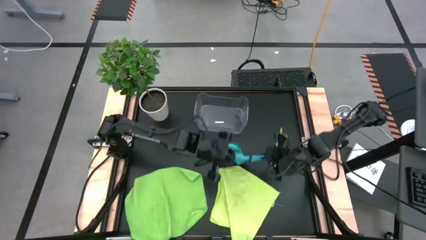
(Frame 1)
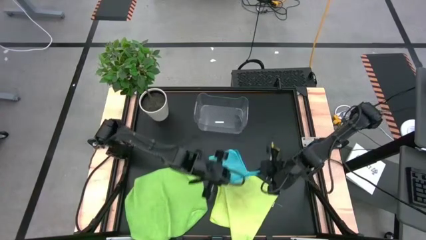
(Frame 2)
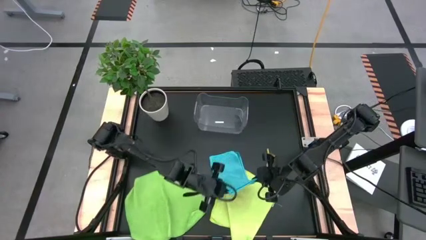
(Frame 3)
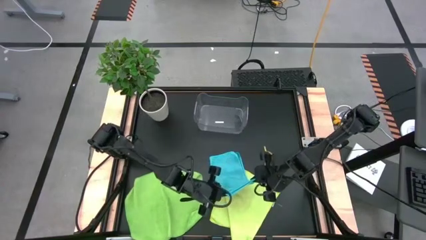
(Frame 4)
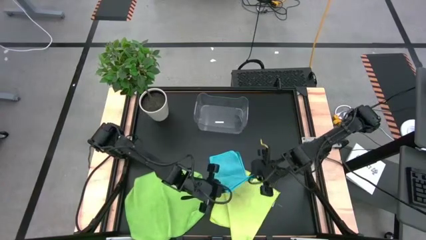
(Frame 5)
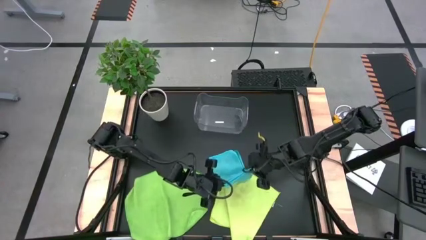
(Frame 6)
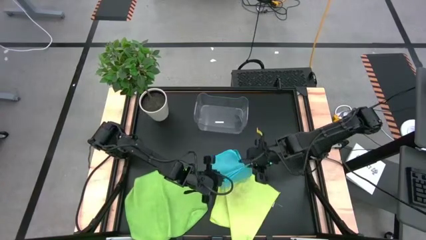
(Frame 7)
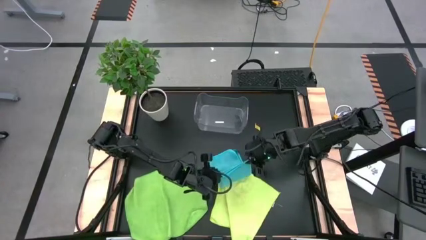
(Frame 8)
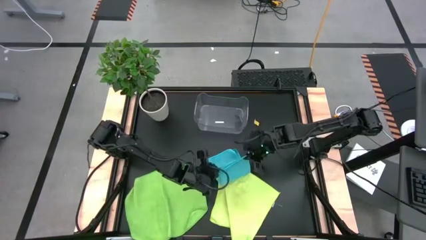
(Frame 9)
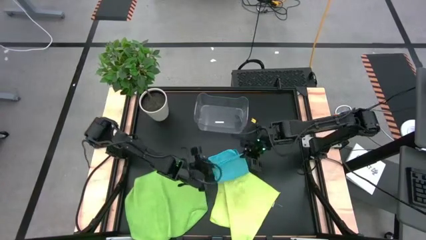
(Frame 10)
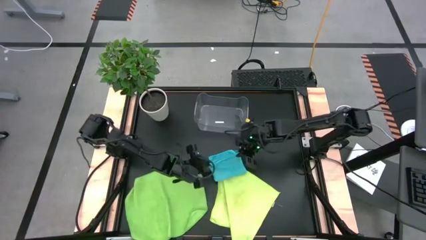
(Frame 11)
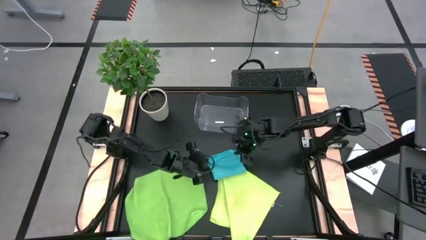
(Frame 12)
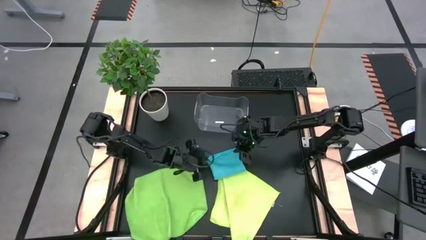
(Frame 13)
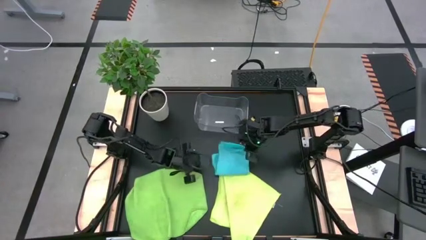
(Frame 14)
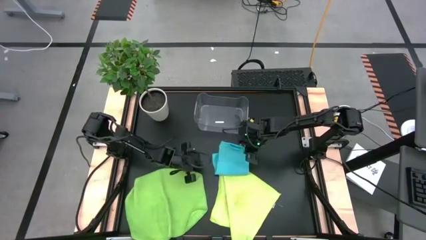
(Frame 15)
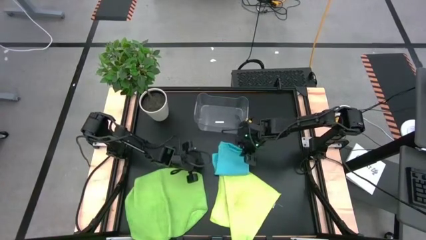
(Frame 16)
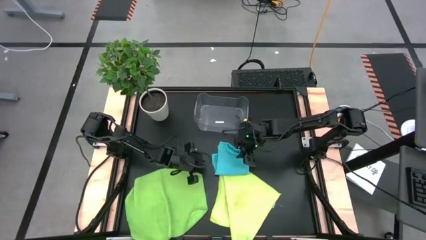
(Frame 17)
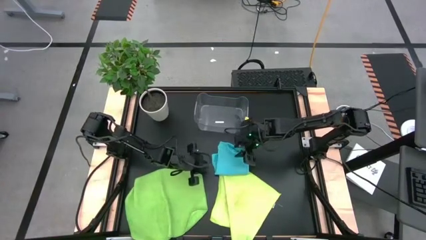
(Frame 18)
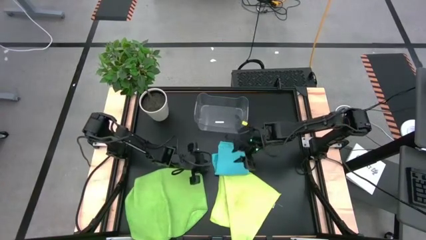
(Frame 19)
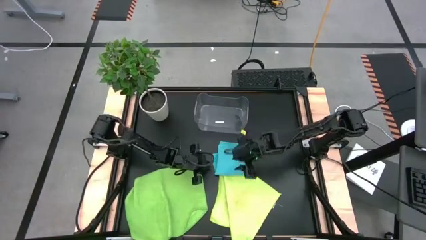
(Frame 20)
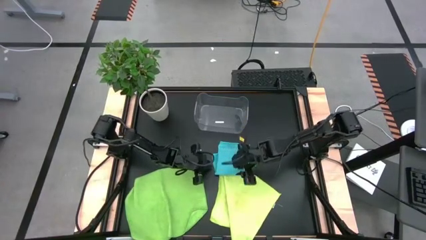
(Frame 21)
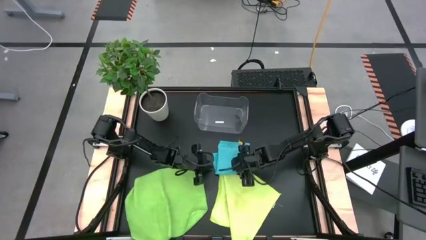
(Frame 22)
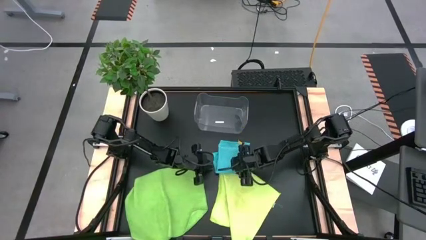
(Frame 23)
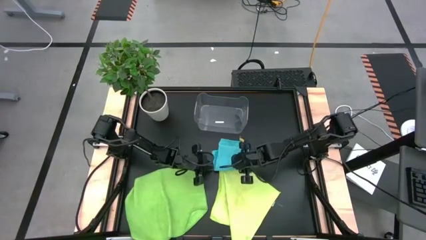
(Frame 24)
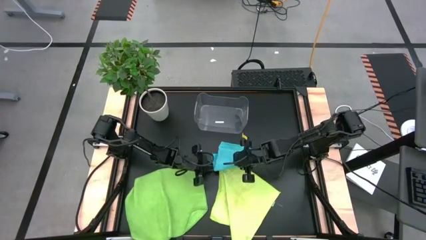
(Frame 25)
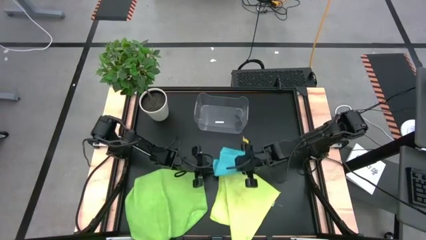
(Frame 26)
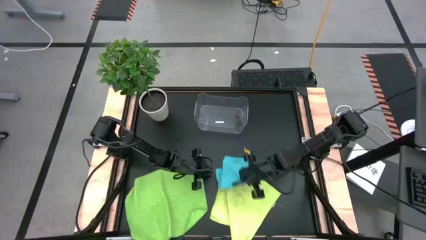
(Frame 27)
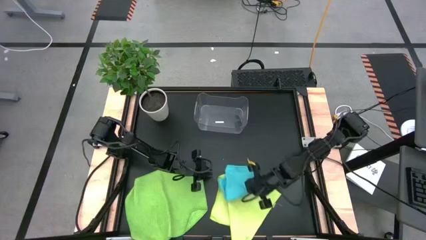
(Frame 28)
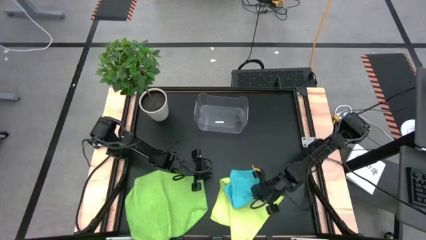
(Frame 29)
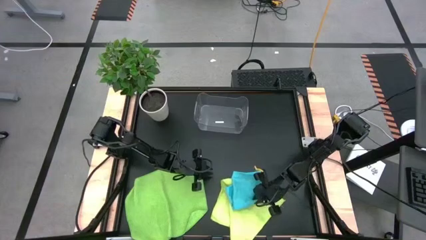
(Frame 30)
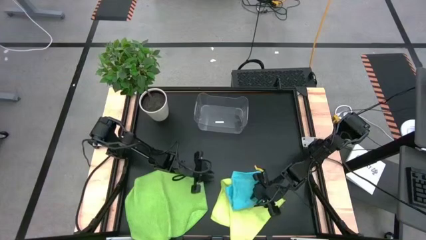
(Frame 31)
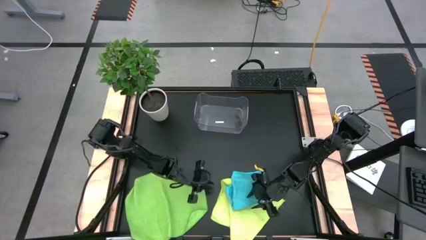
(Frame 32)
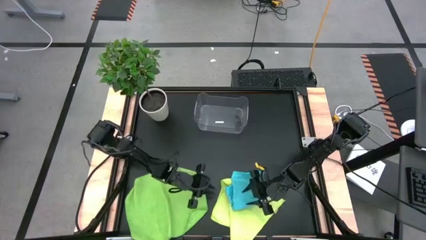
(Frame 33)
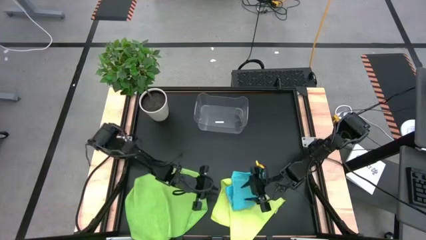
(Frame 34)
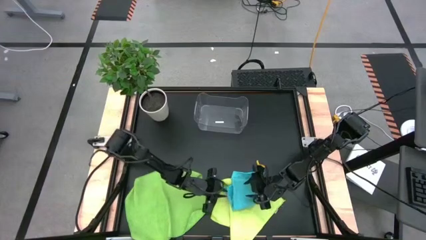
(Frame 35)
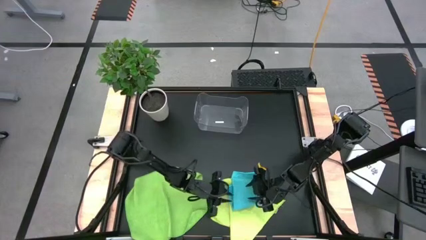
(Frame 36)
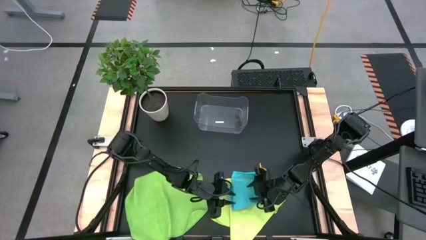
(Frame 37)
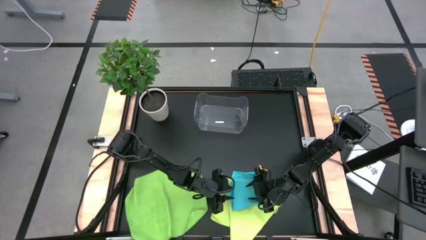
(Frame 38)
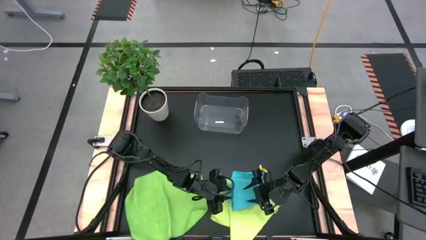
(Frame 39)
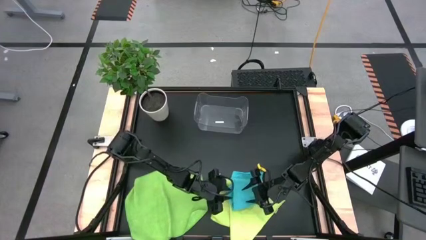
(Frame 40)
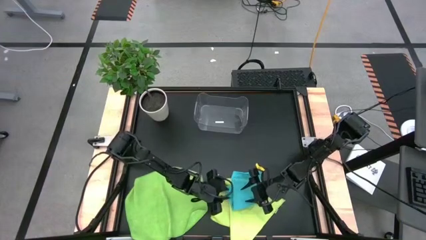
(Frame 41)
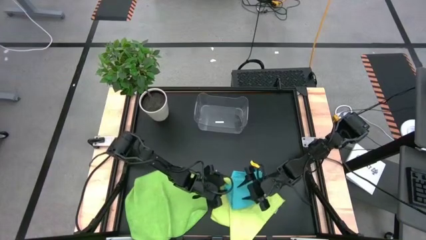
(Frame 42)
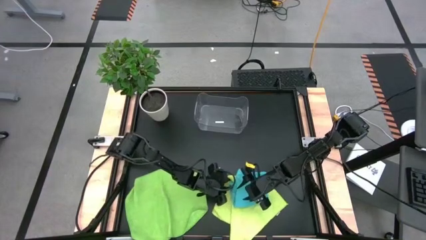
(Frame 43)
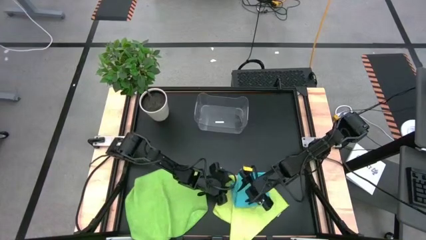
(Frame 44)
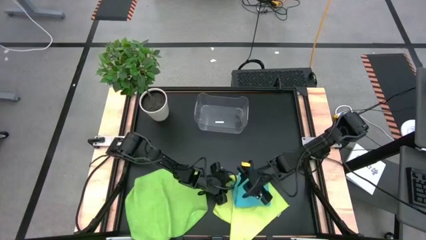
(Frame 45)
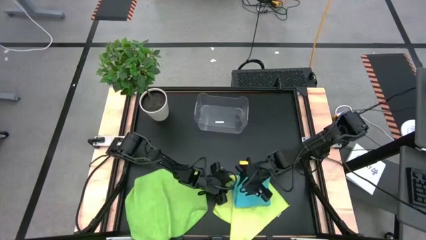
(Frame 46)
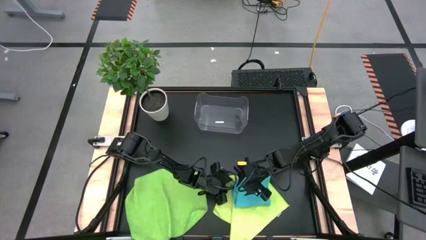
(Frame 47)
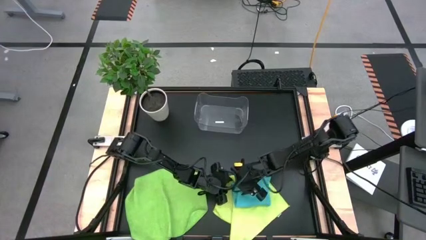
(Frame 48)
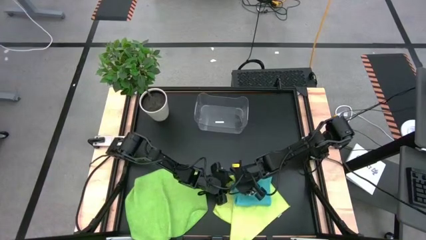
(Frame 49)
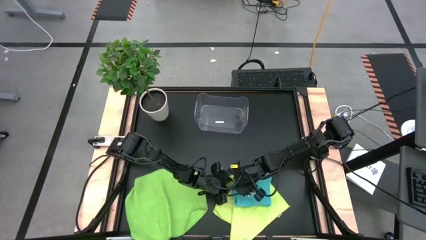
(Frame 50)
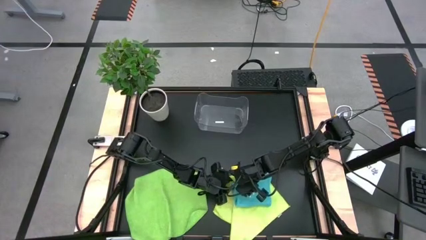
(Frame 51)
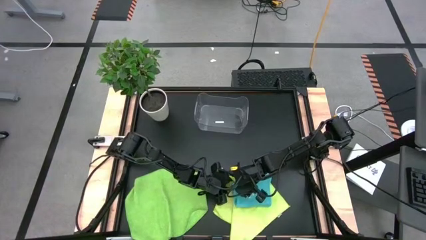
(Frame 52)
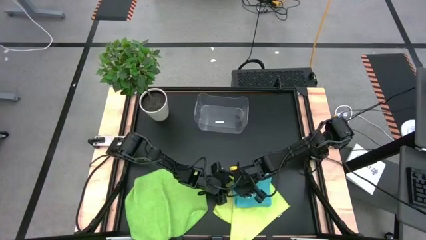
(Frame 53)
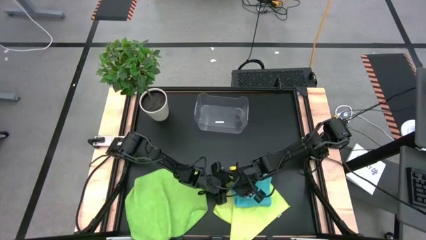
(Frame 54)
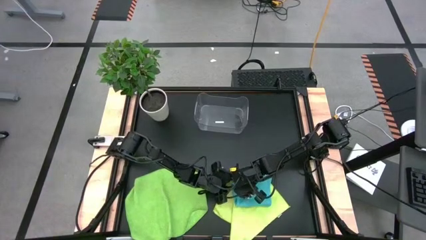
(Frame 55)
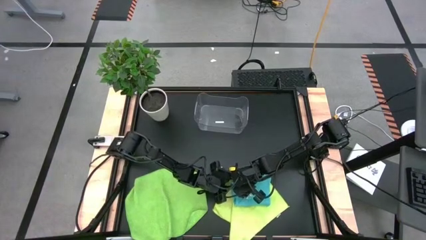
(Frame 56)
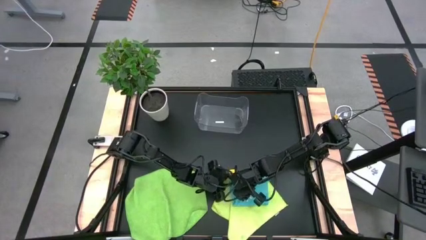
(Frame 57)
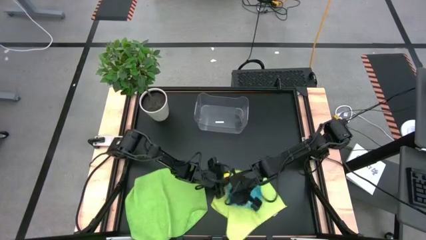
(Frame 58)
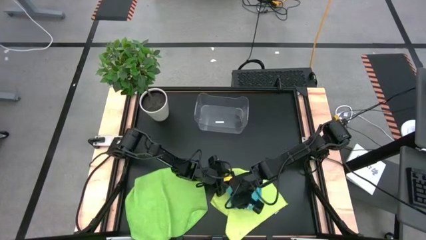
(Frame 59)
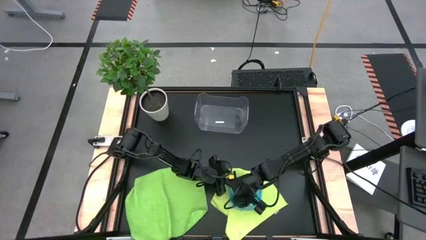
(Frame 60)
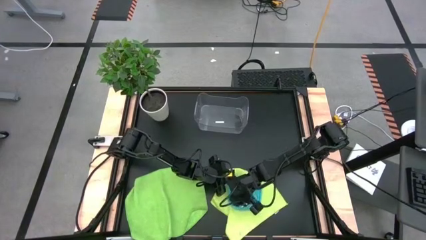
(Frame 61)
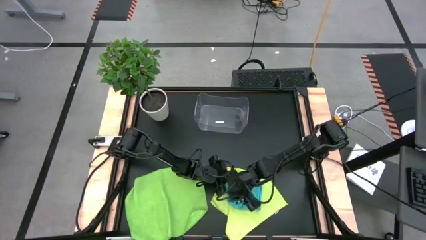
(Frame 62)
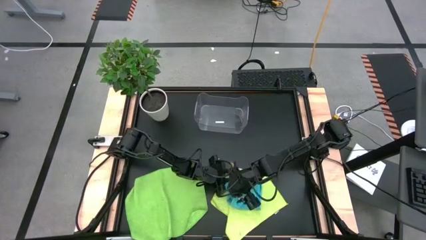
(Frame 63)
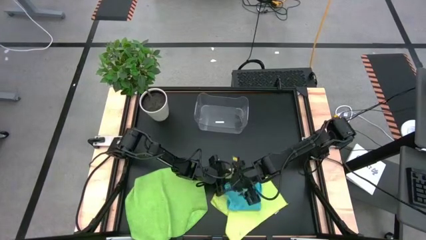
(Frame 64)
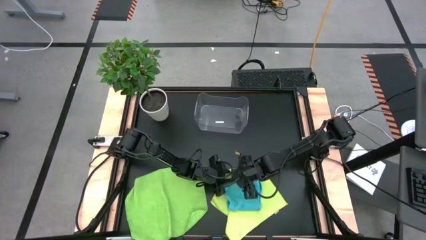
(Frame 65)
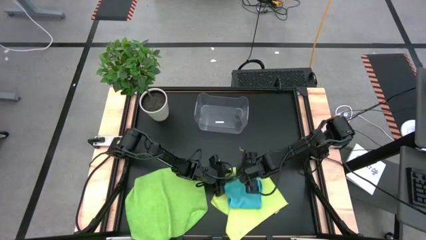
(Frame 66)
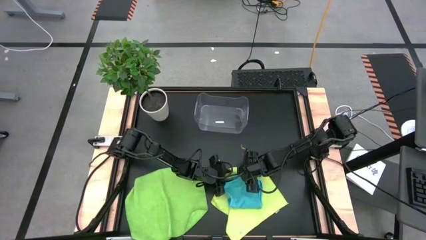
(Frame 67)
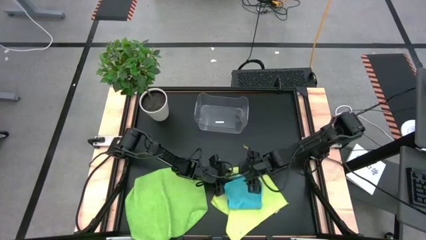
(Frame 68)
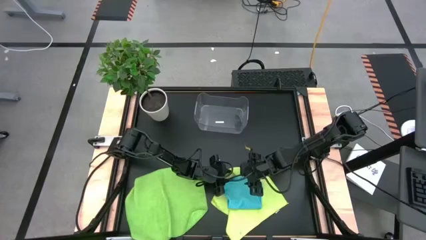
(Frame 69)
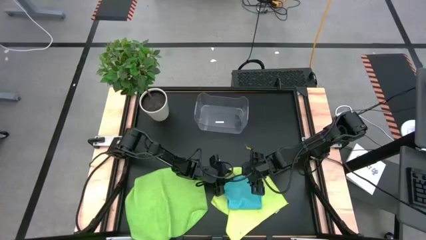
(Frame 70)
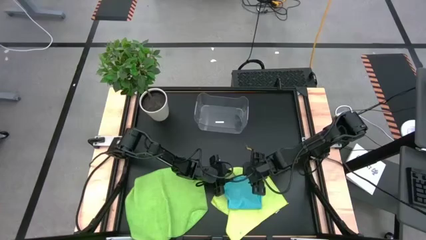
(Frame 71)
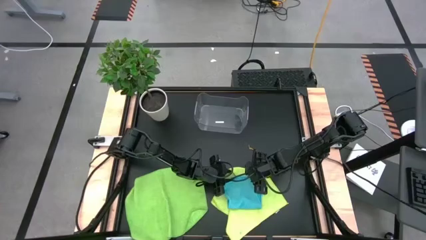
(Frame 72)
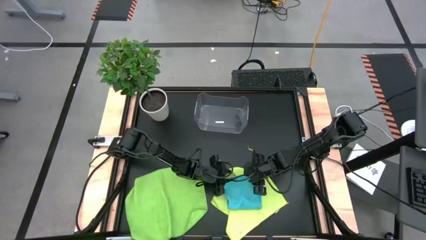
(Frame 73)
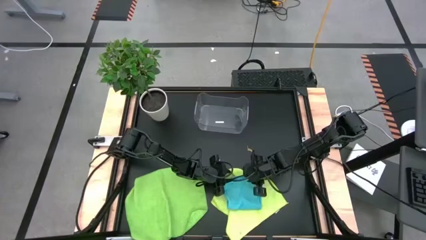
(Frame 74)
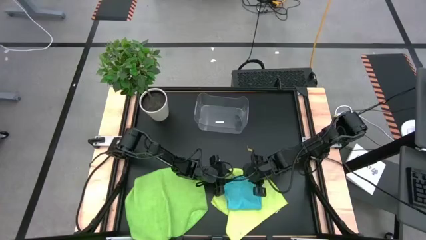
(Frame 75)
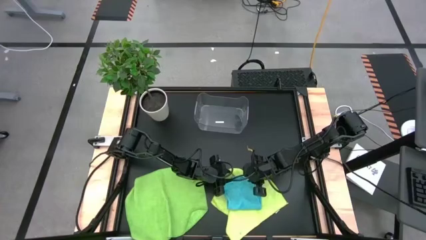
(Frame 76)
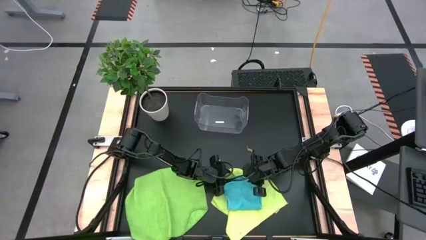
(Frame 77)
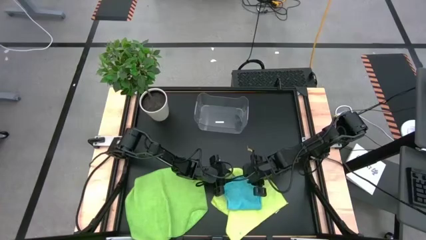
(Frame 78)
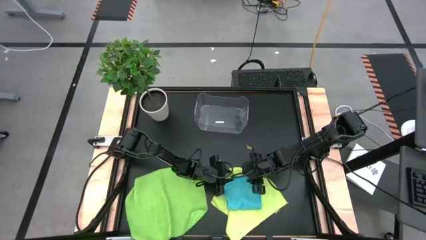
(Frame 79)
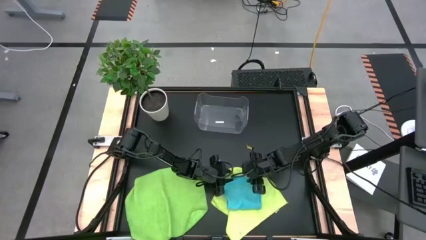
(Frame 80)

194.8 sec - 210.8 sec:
Task: Fold microfiber towels
Fold the blue towel

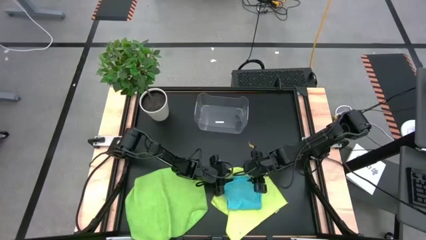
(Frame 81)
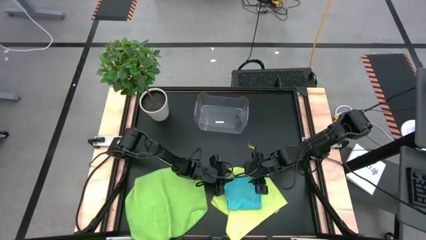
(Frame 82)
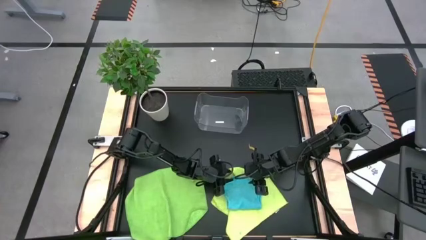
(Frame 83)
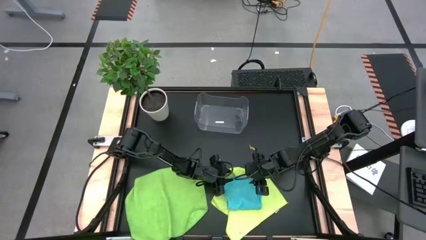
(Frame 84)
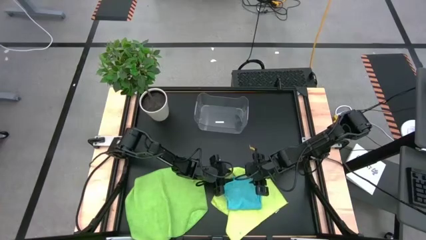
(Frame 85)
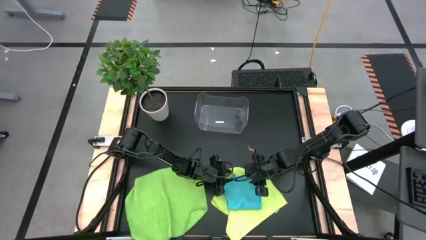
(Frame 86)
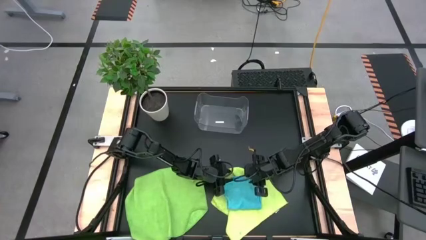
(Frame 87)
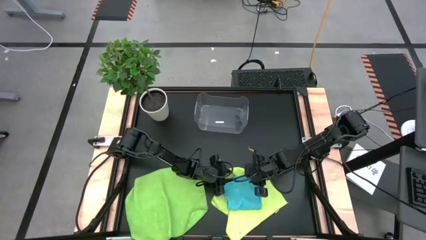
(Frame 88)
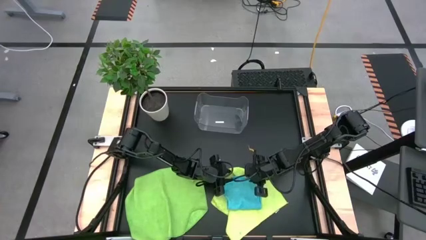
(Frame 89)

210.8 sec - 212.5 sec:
Fold the blue towel
